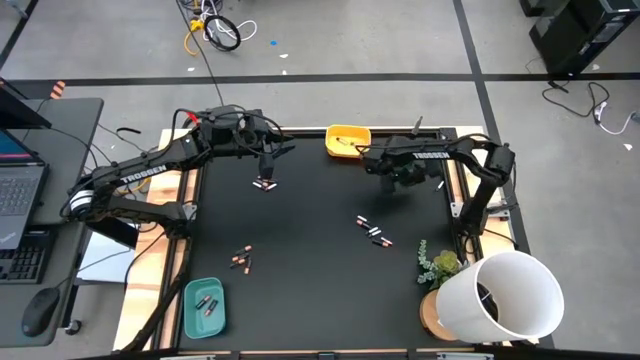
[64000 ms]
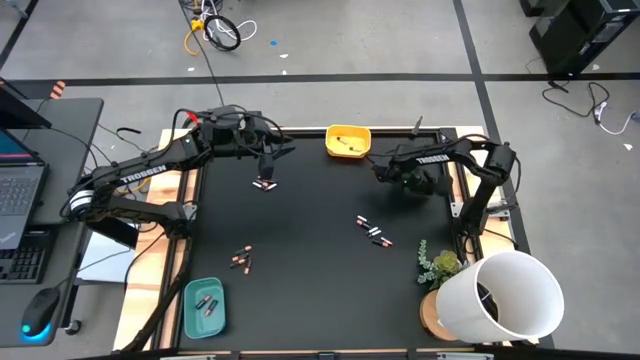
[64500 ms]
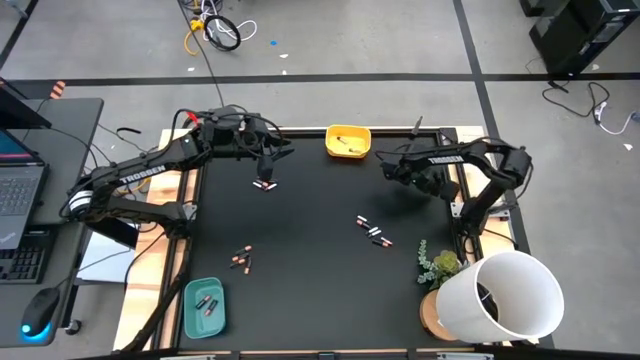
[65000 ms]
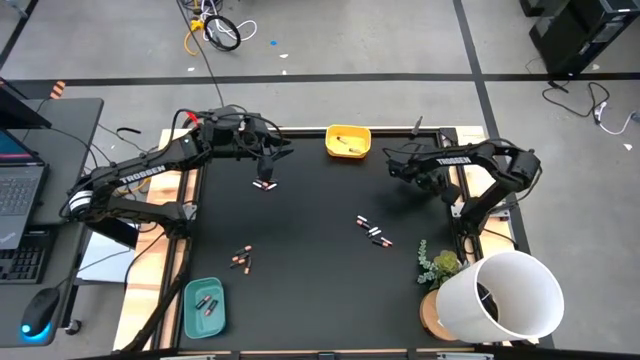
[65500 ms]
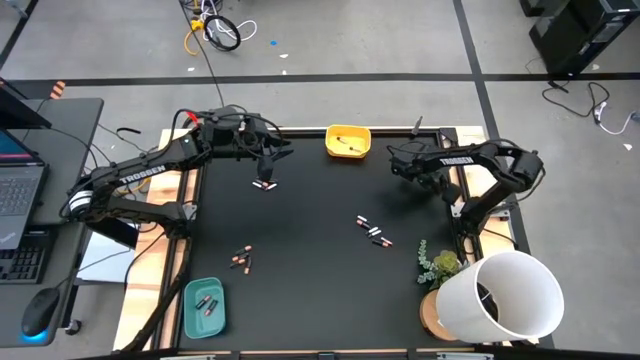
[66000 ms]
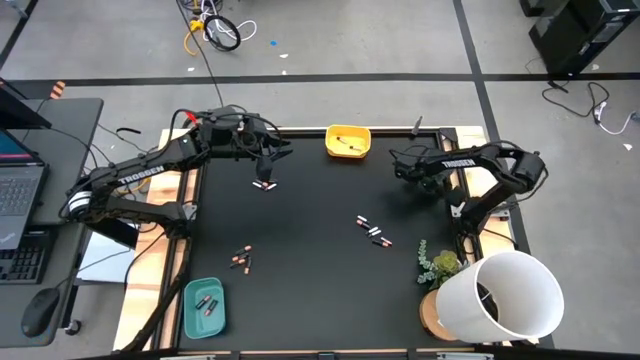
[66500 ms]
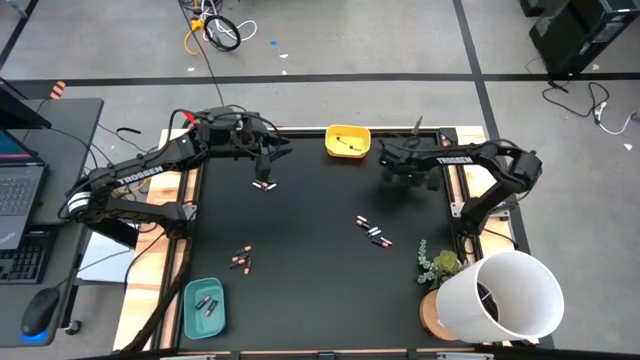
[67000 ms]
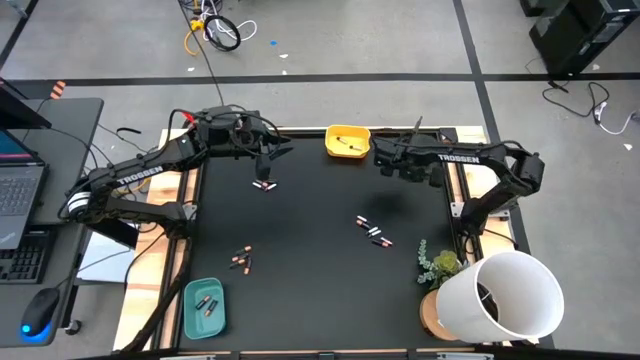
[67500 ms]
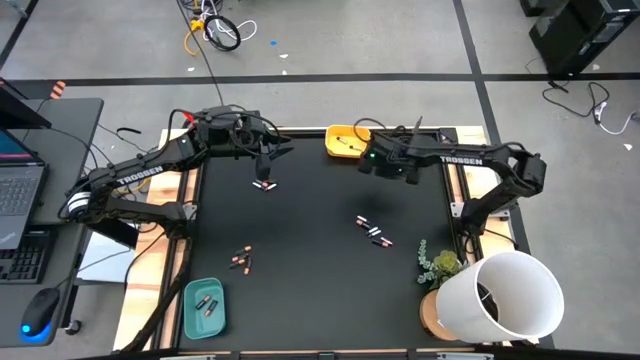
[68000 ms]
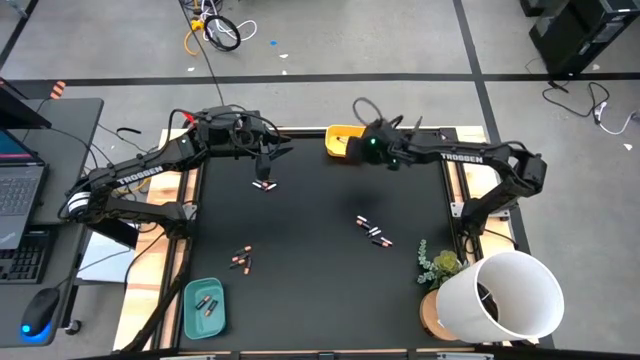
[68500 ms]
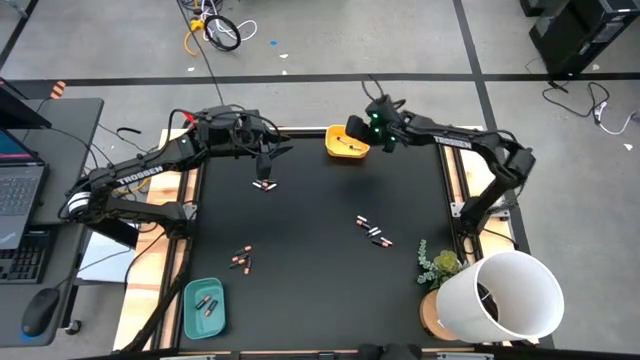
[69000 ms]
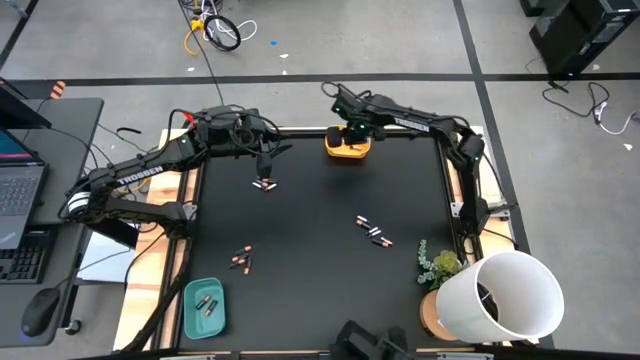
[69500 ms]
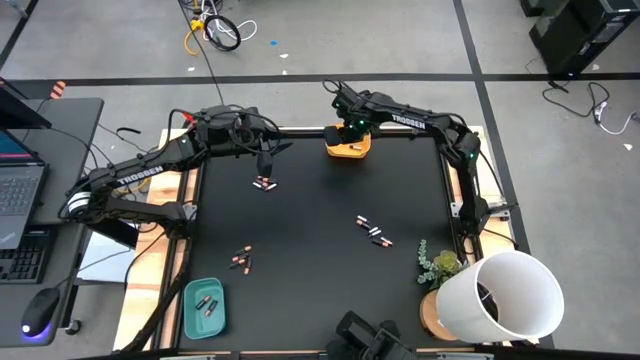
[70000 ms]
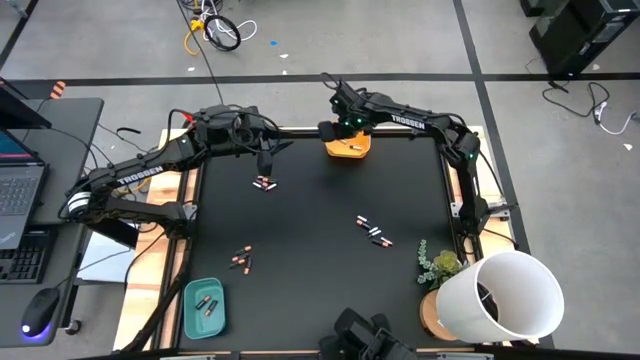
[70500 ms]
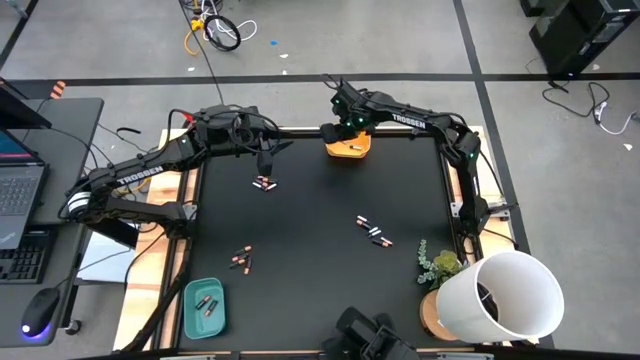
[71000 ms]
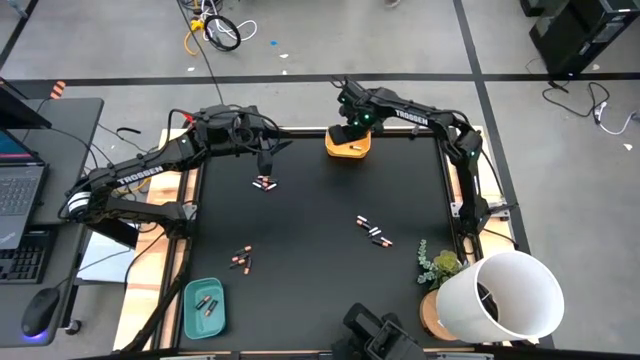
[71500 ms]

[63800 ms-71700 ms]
Task: Sort batteries
Put the silver battery into the yellow bin

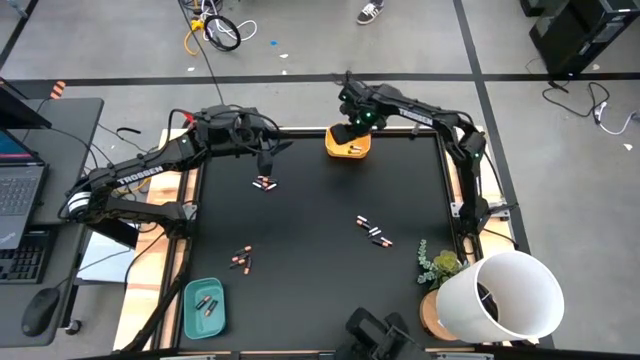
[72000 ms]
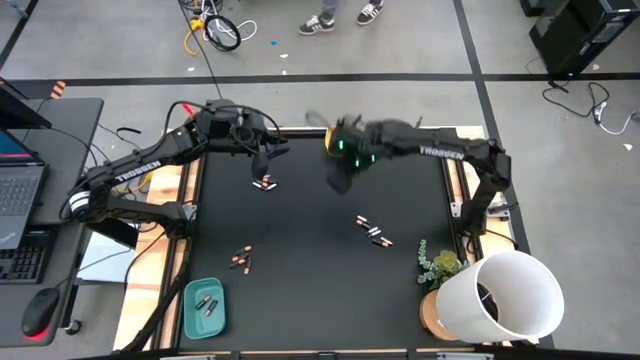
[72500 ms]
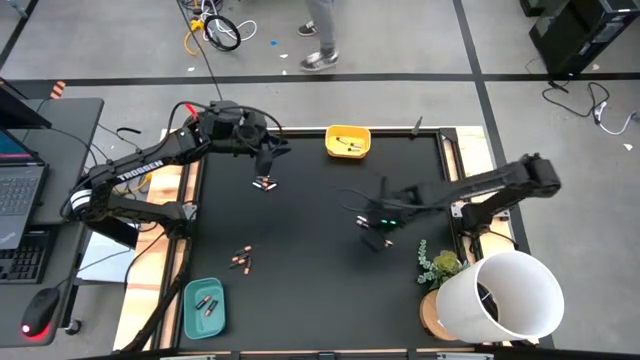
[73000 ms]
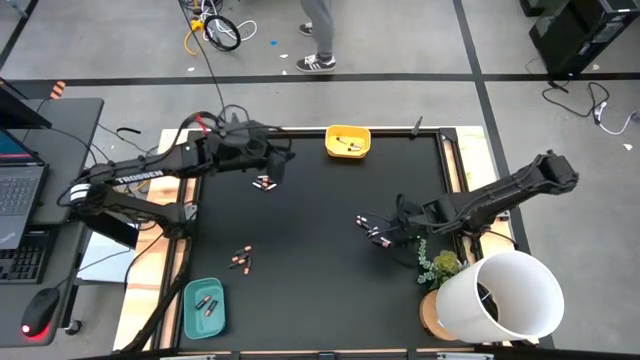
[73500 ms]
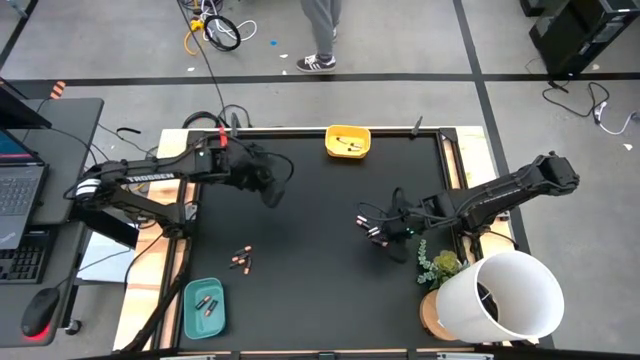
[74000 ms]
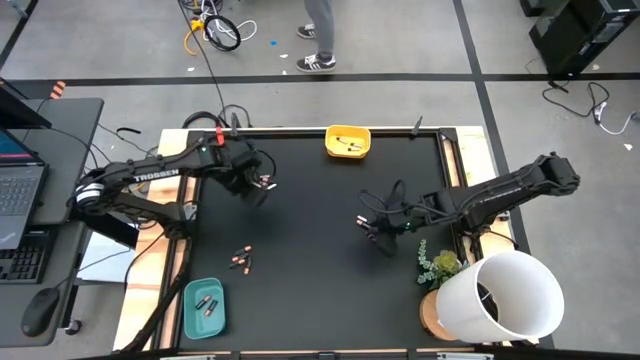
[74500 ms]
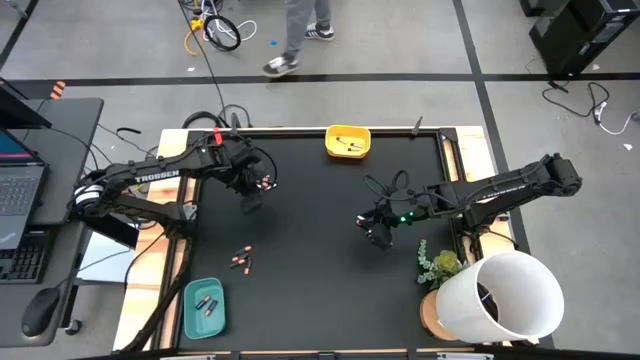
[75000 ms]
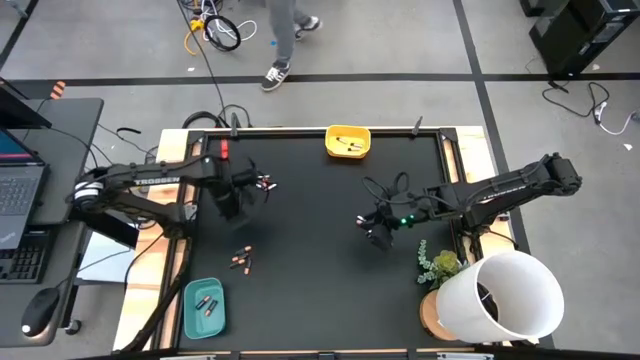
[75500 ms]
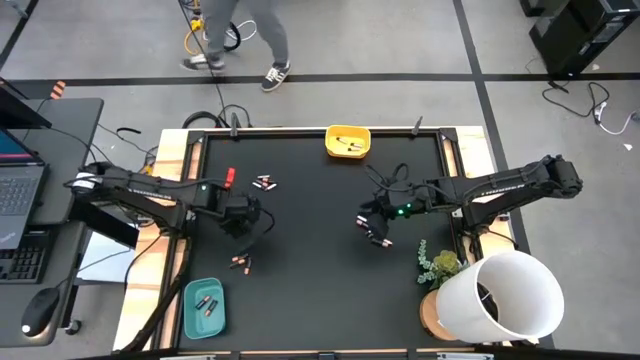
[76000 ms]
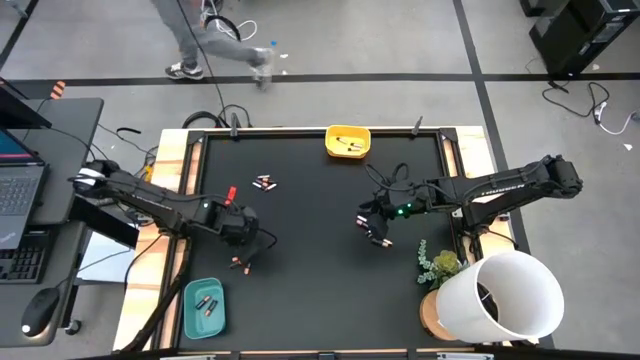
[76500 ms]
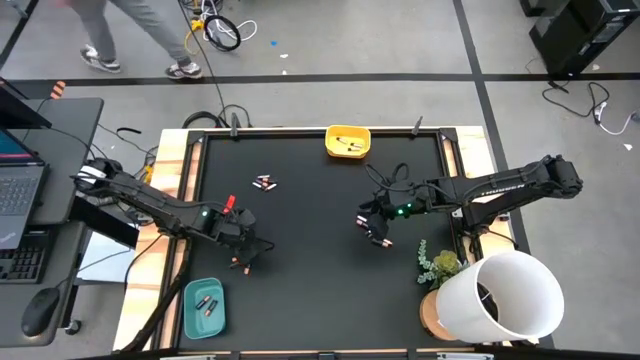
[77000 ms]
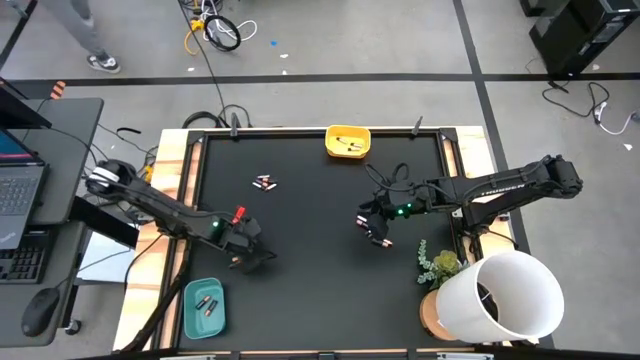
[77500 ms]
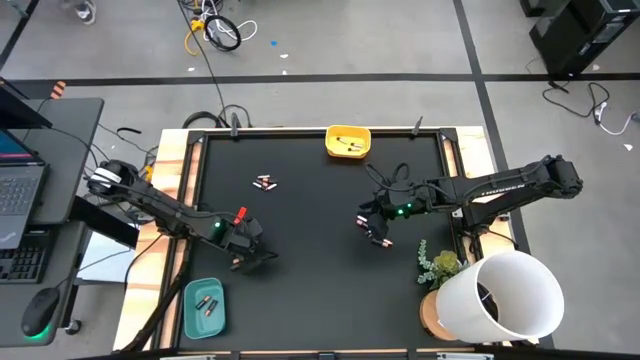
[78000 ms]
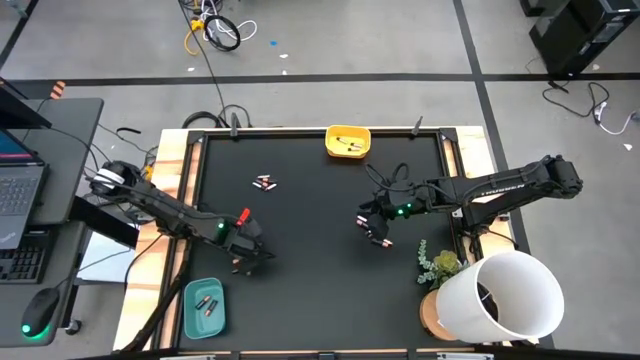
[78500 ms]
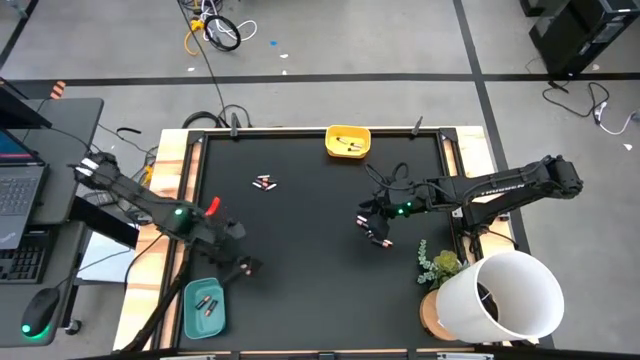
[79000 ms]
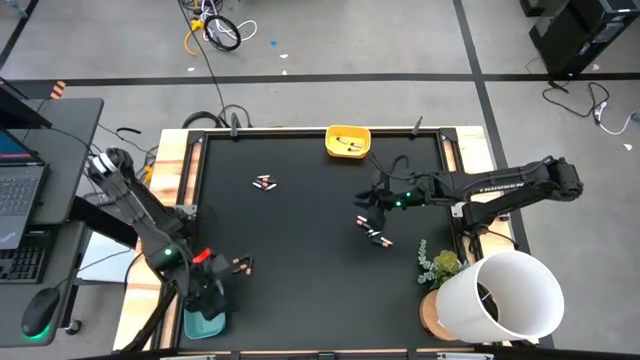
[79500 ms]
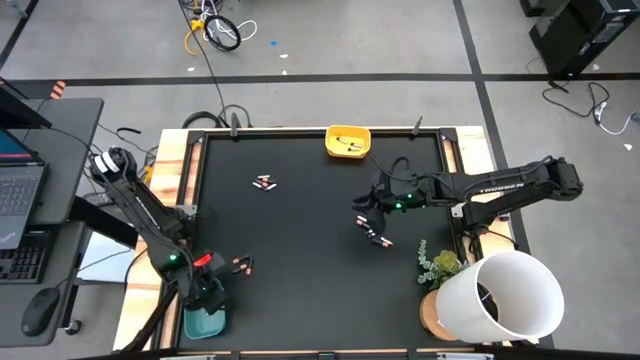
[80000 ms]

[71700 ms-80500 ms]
Put the black battery into the green bin

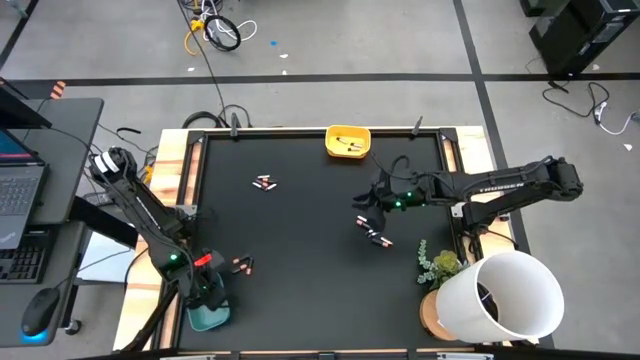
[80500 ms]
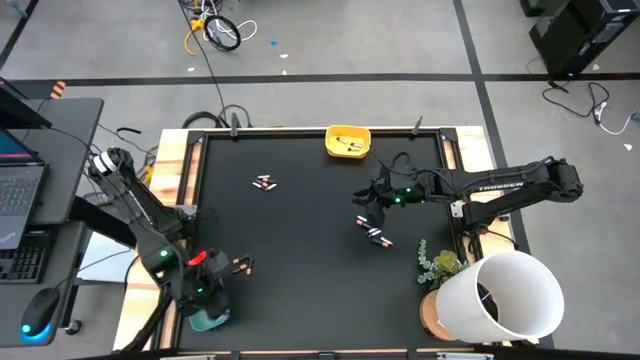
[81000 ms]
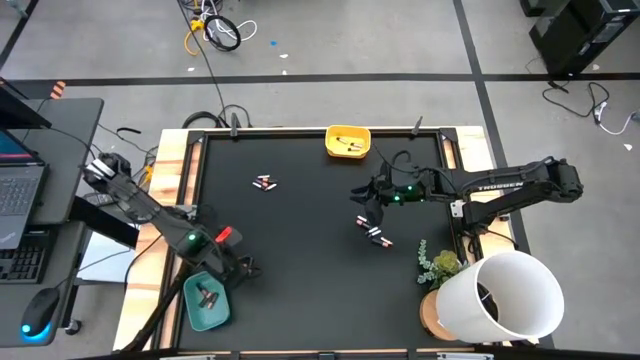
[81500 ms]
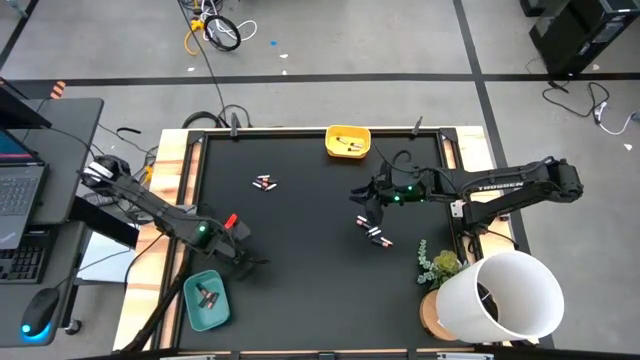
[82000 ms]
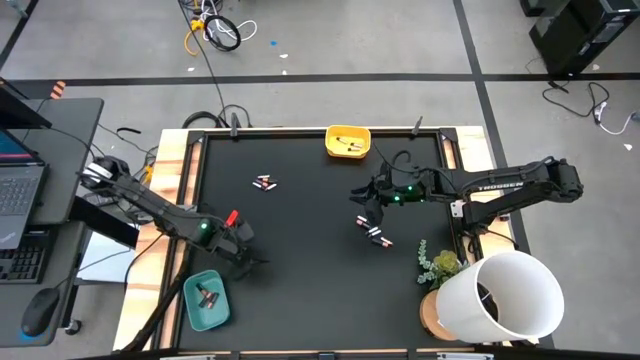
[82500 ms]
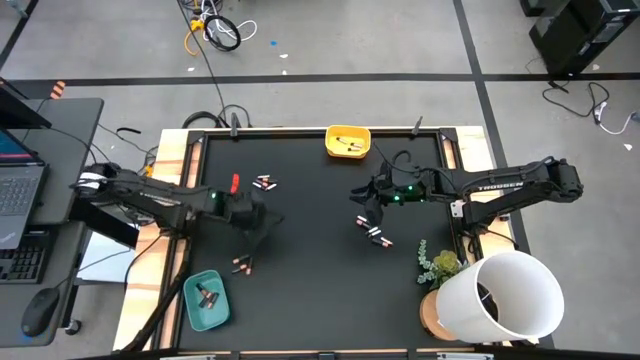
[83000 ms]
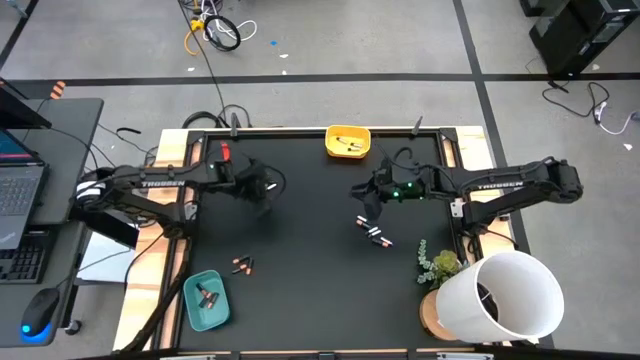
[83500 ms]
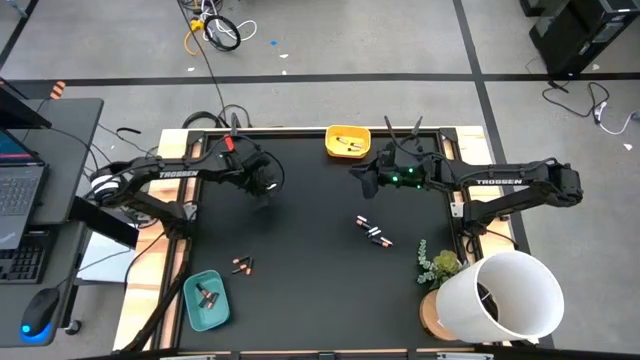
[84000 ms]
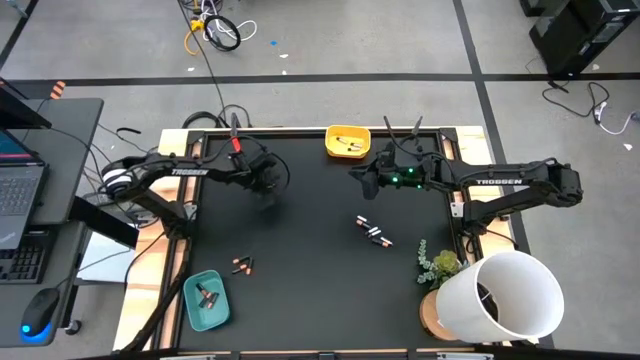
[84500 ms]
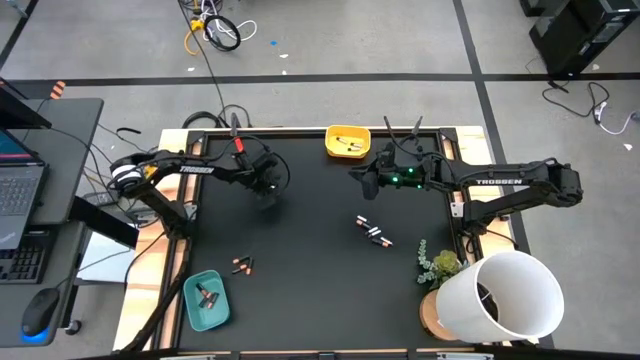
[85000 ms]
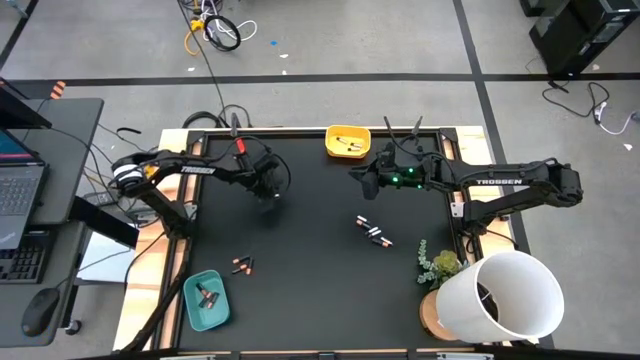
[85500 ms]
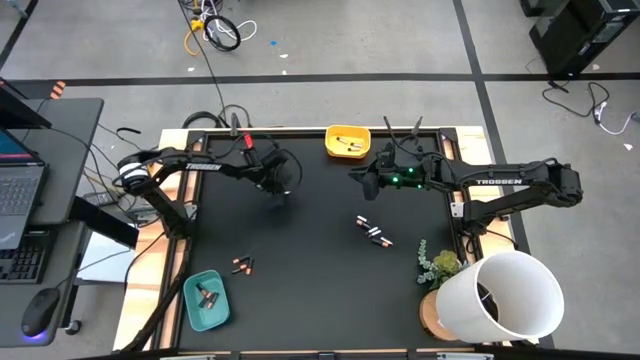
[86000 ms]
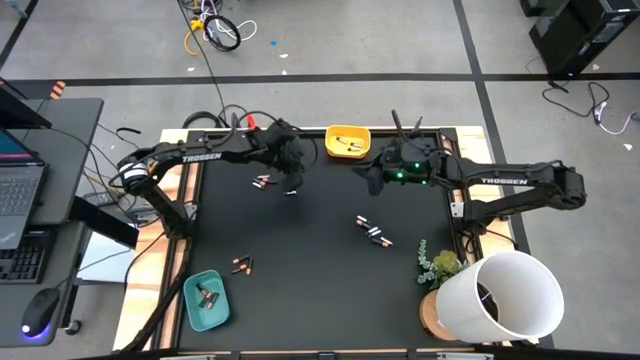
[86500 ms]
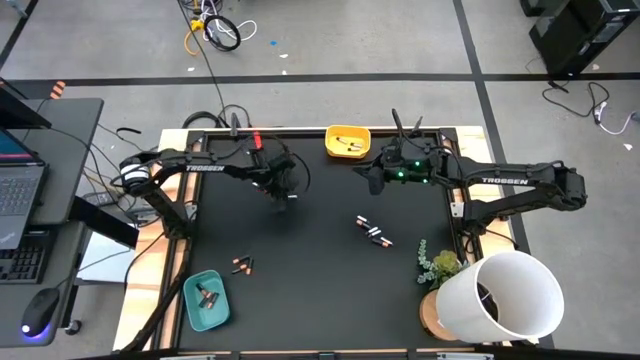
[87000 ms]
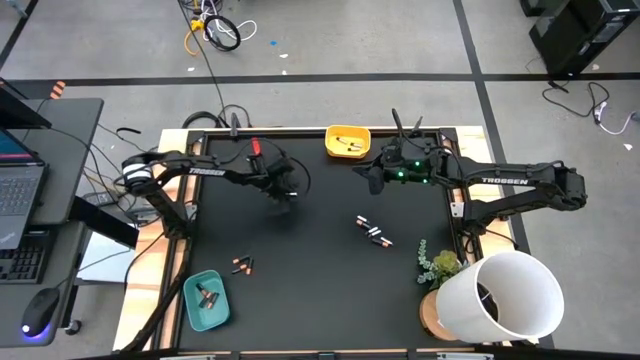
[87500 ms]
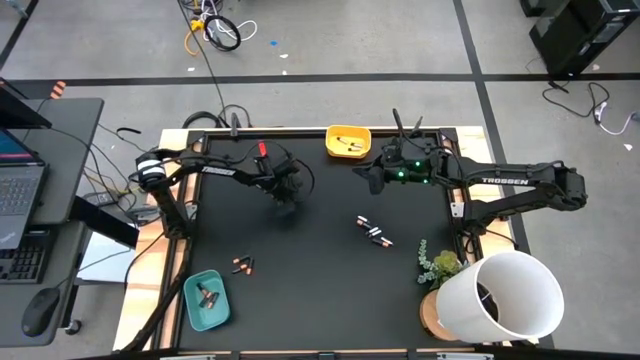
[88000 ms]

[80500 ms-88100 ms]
Put the silver battery into the yellow bin
